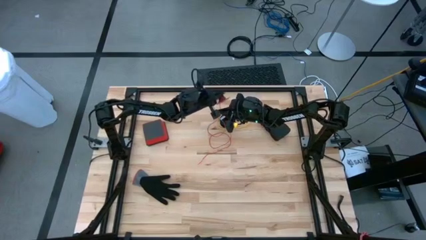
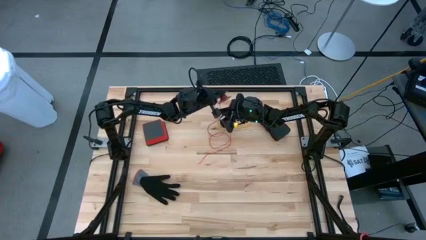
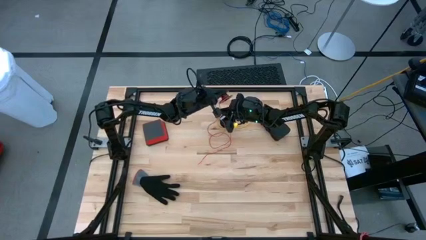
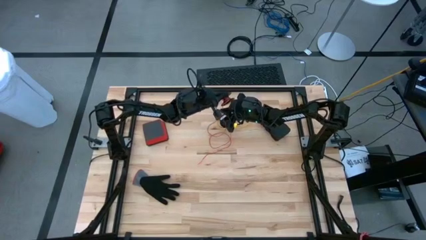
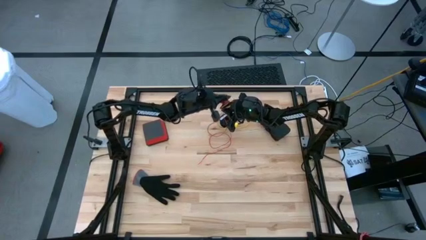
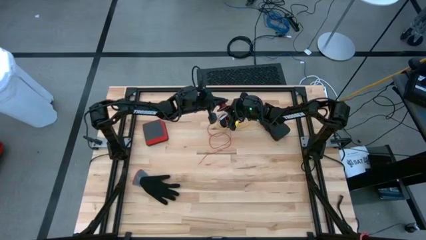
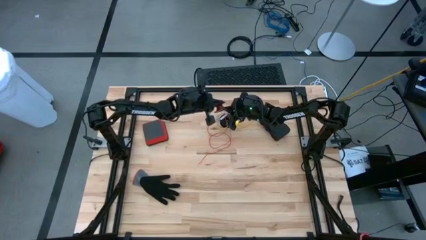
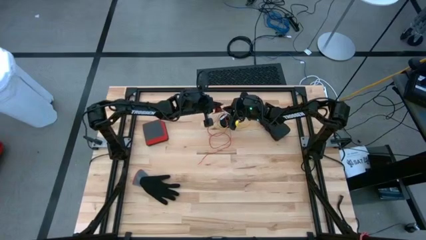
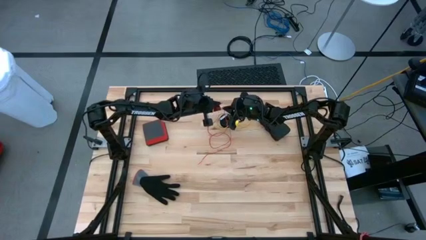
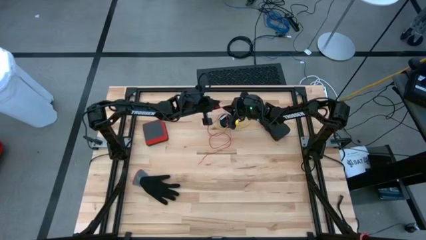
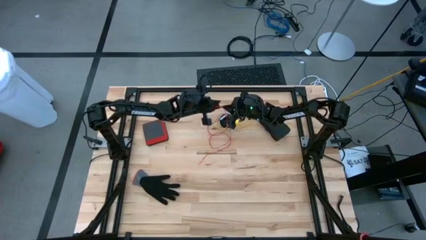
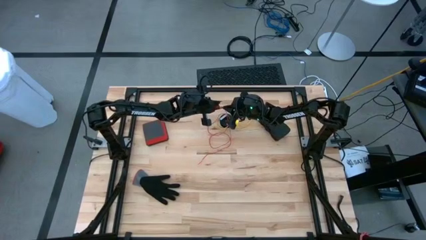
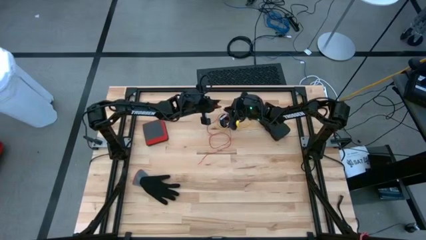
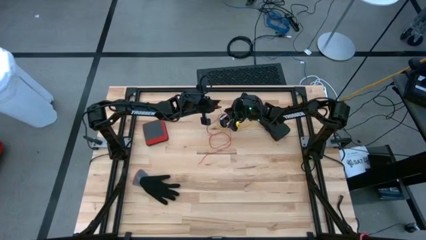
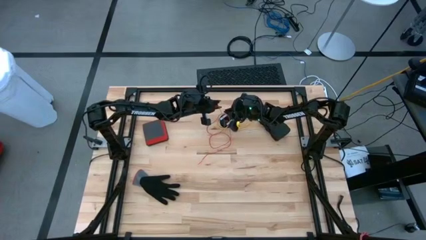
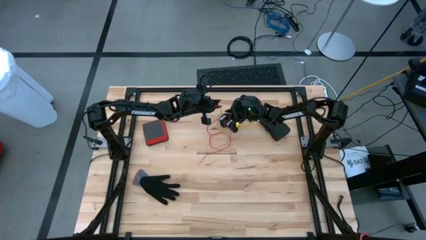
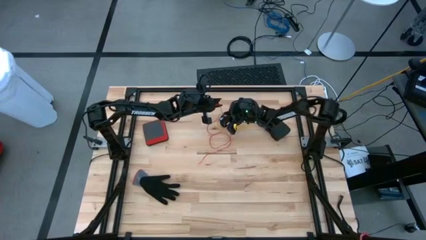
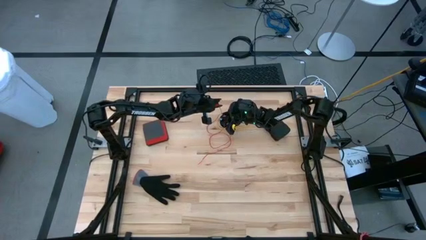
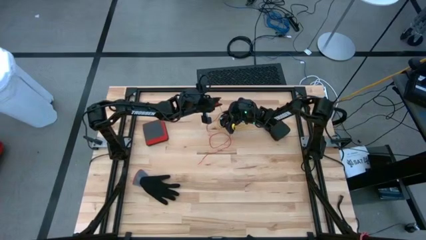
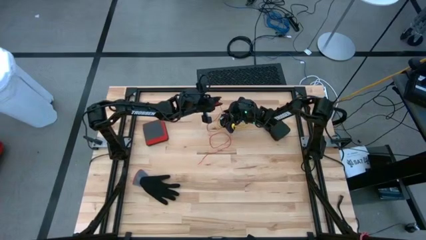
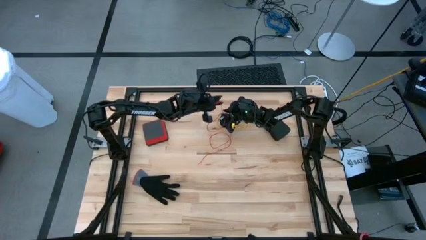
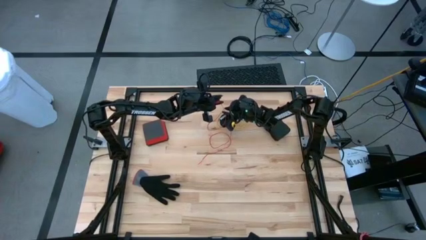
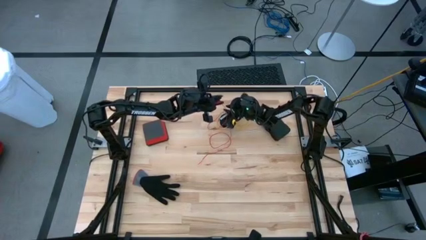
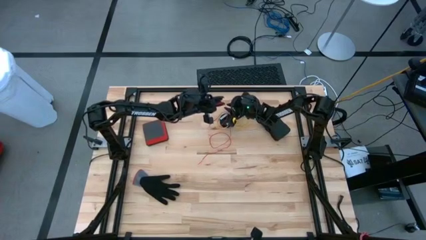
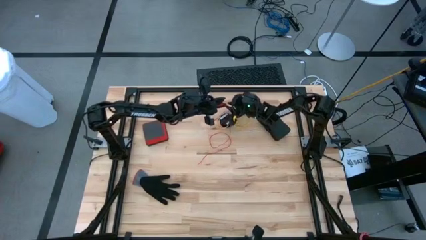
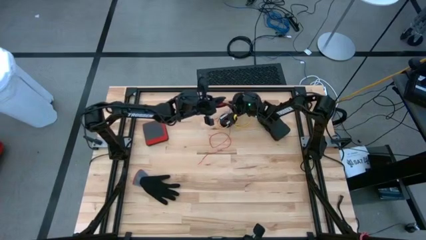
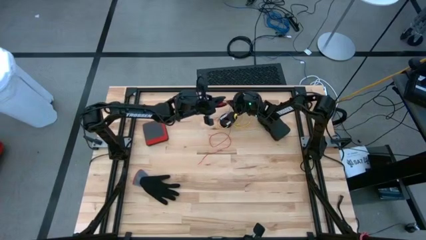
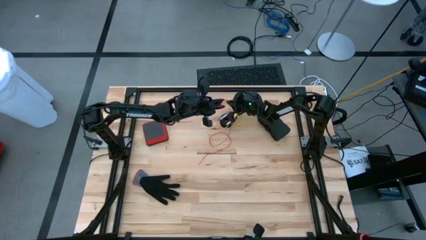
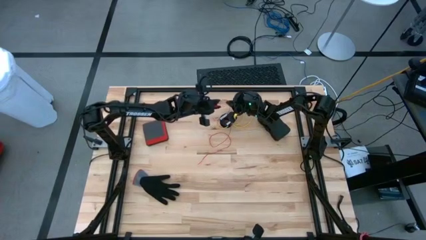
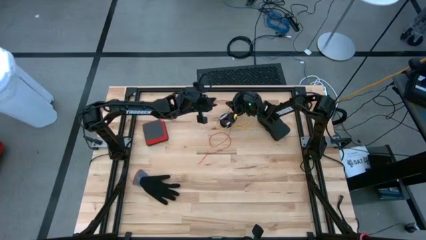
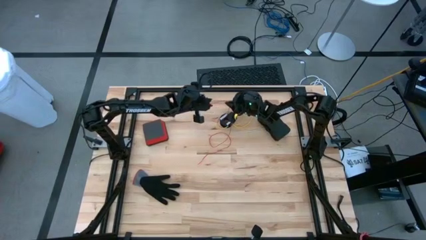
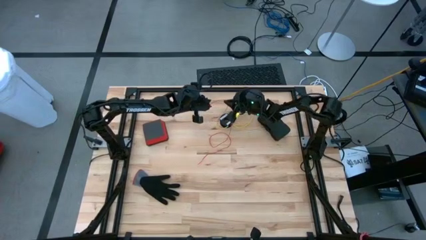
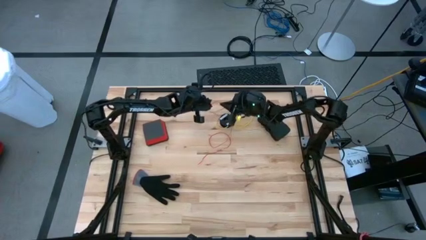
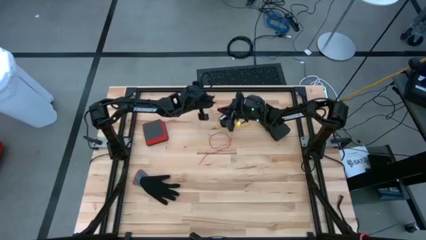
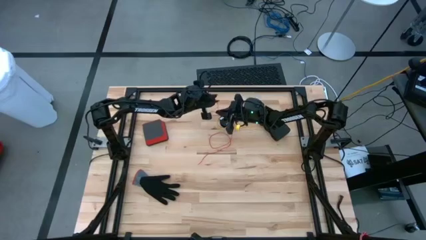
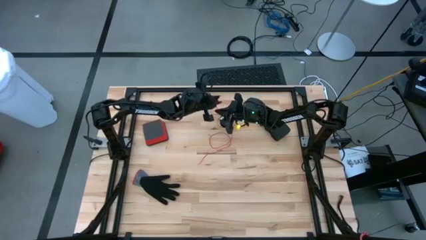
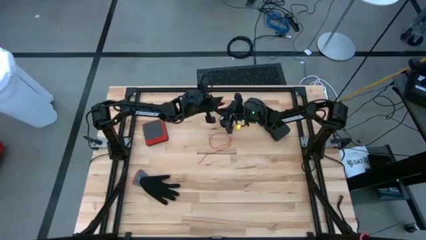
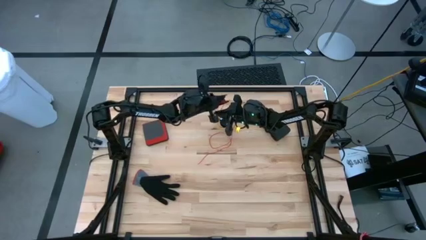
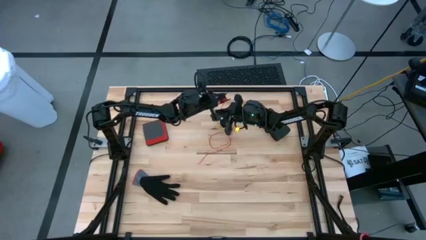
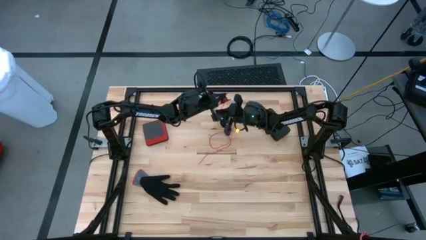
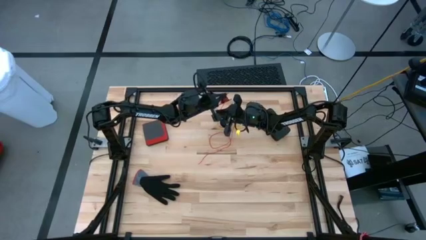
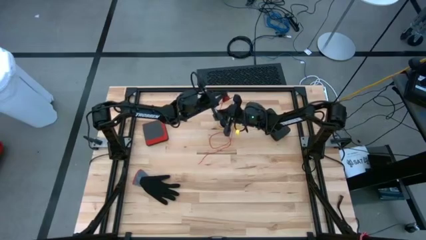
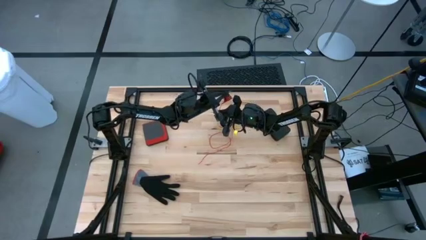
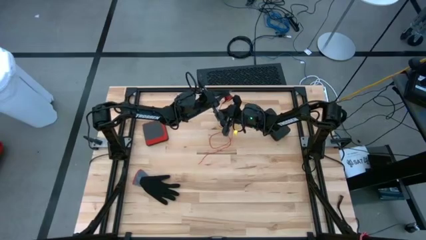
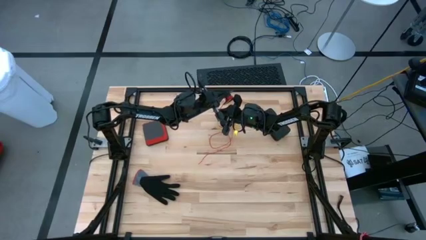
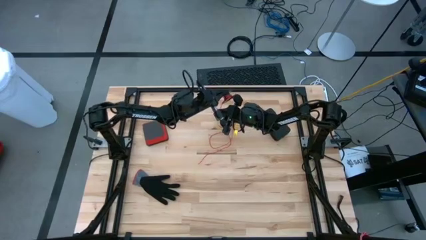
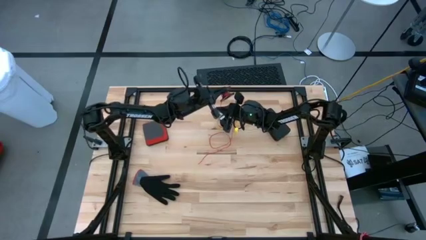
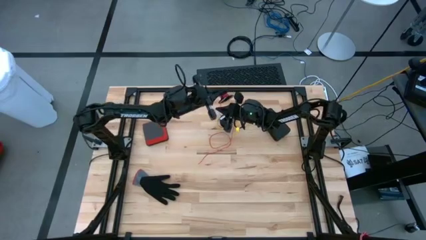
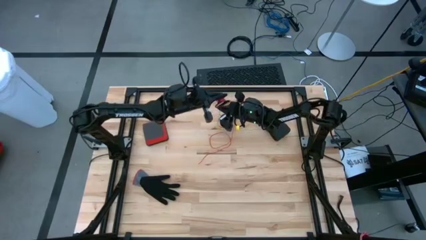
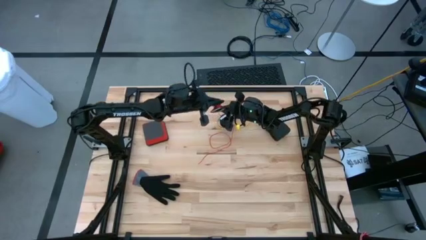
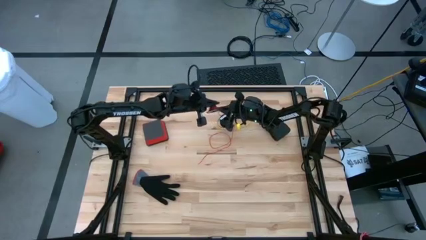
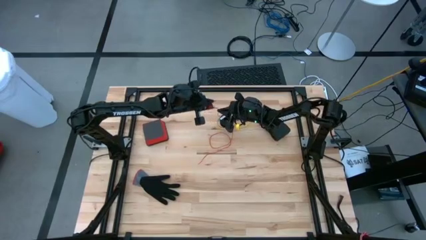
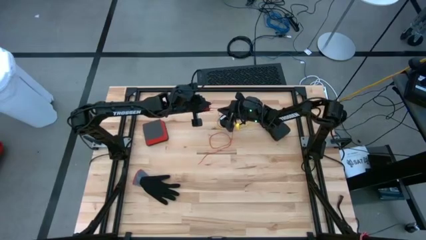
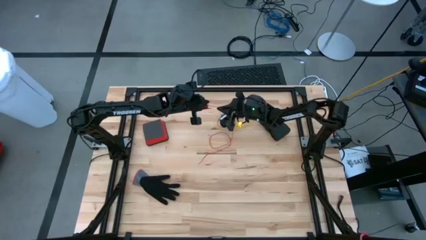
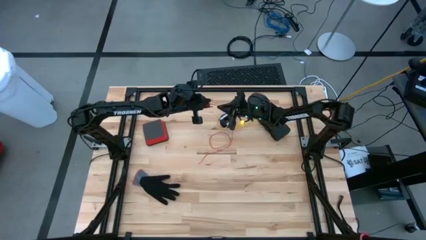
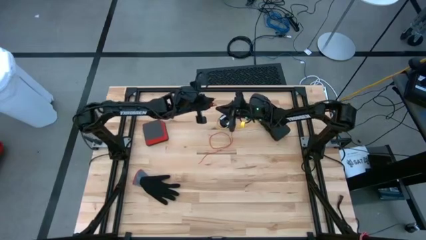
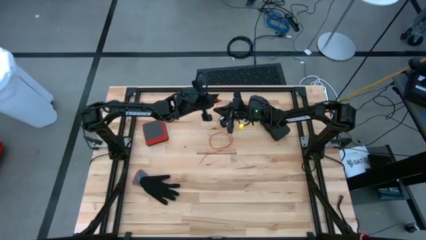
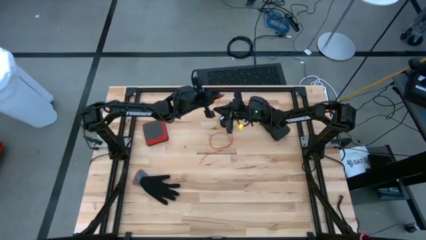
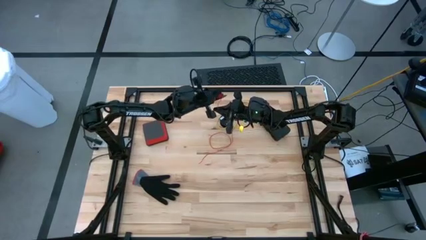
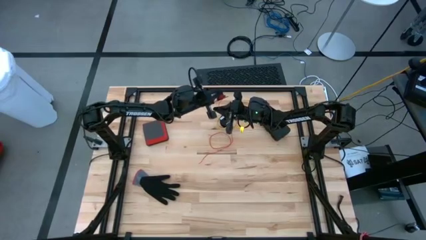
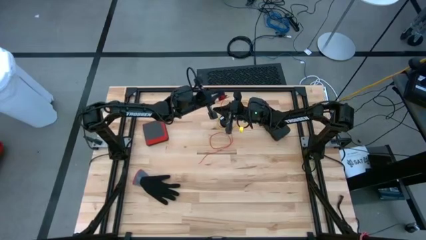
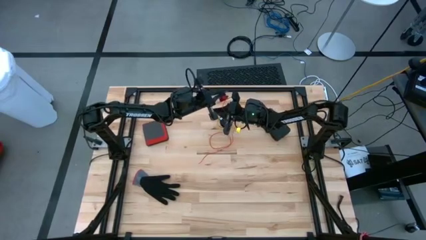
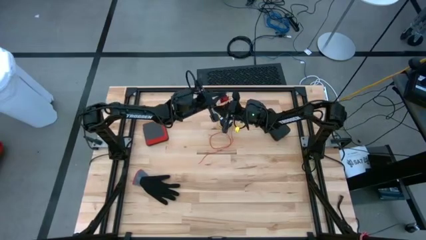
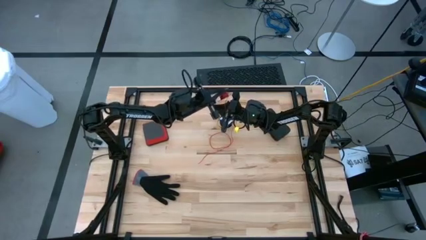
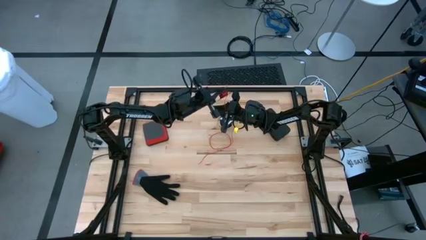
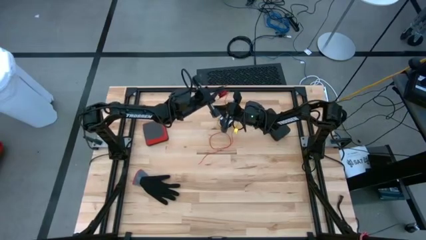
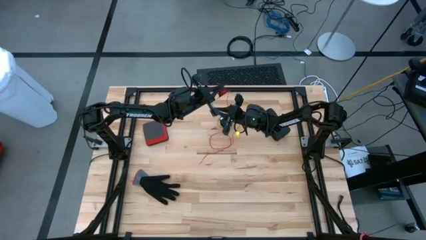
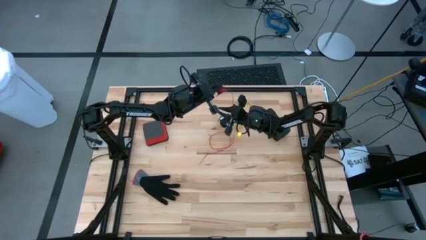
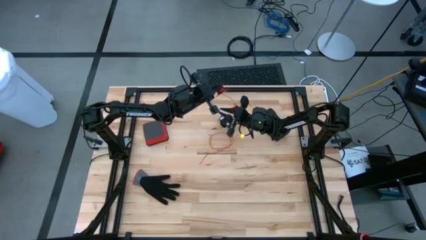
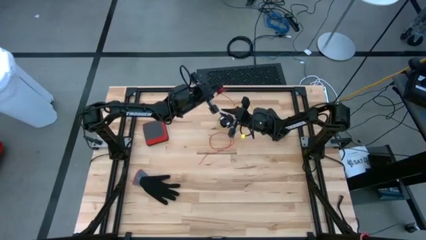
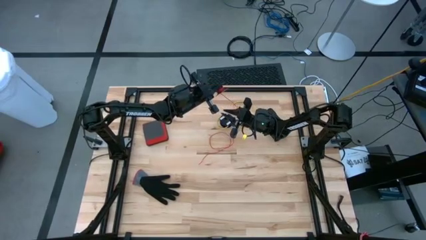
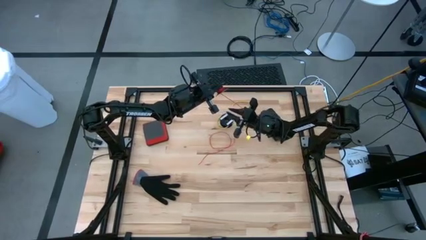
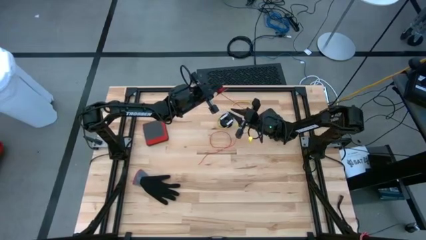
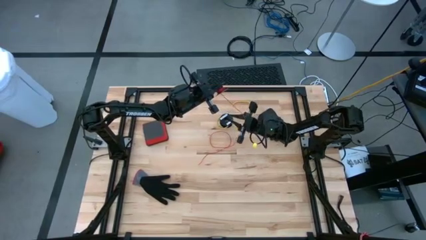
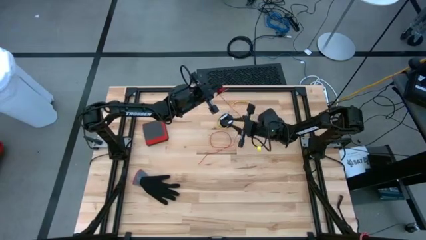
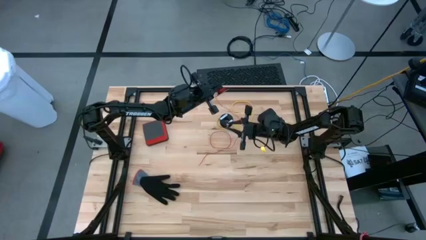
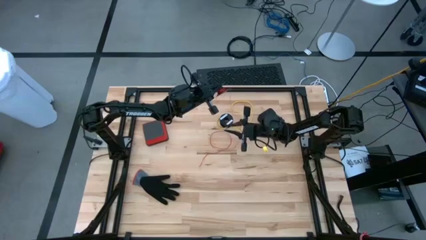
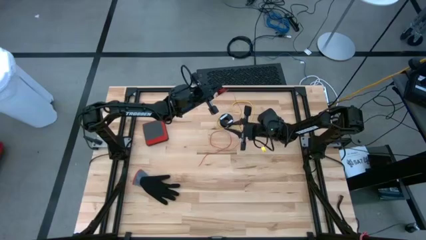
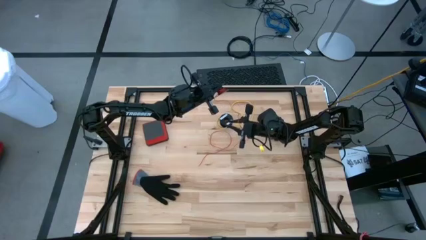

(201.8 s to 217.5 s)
Task: Coil cords
Coil the red wire into the spool
